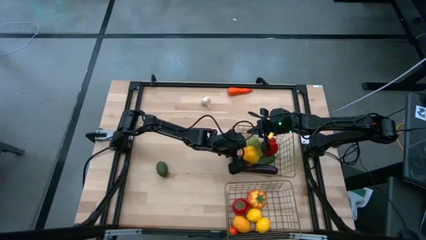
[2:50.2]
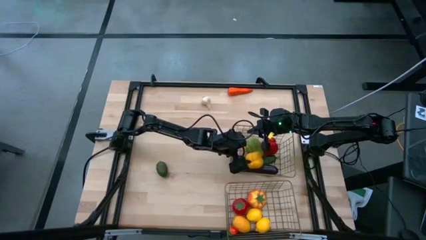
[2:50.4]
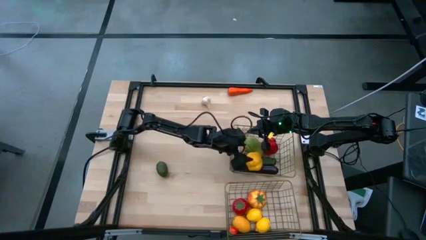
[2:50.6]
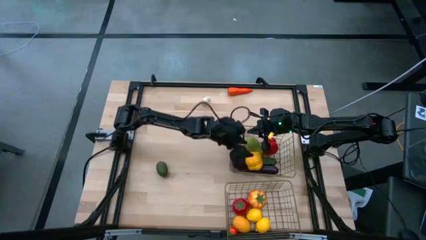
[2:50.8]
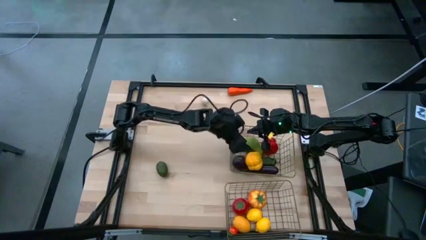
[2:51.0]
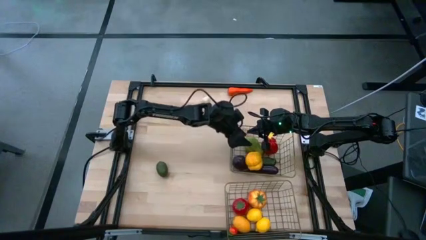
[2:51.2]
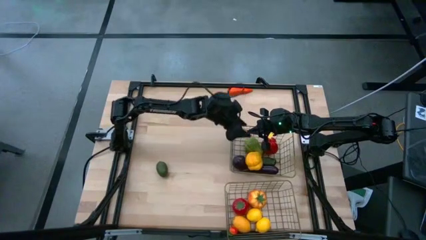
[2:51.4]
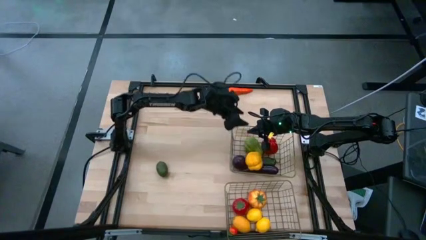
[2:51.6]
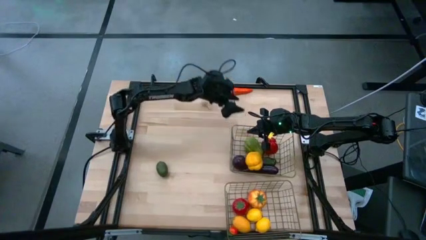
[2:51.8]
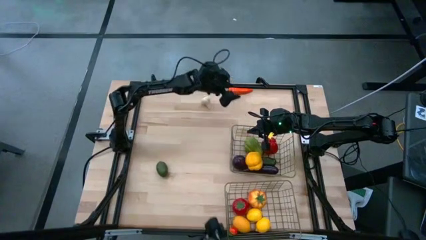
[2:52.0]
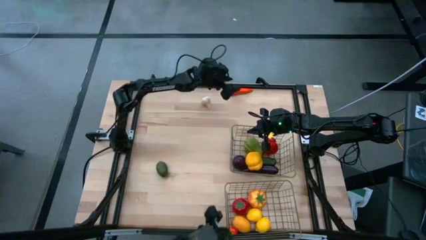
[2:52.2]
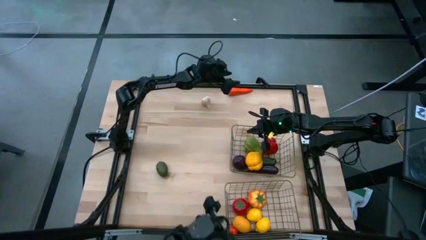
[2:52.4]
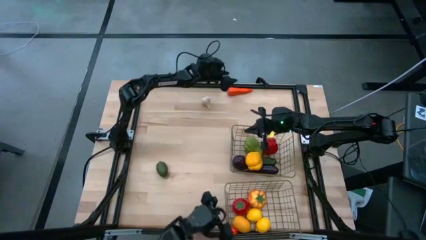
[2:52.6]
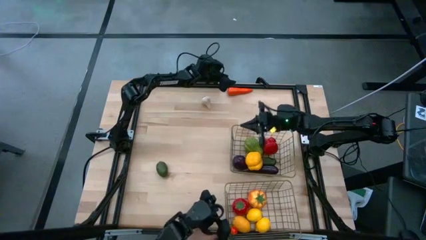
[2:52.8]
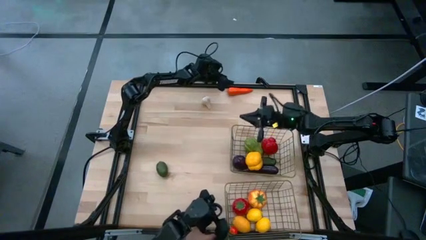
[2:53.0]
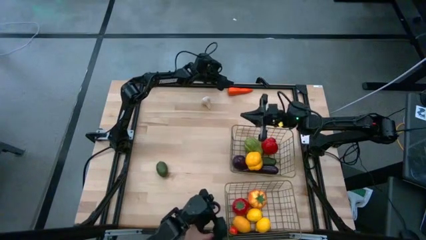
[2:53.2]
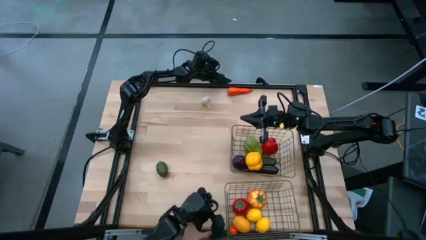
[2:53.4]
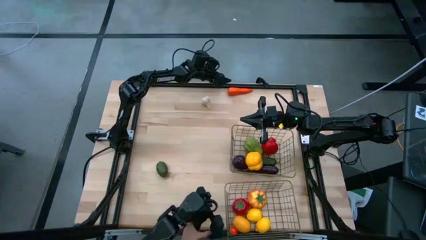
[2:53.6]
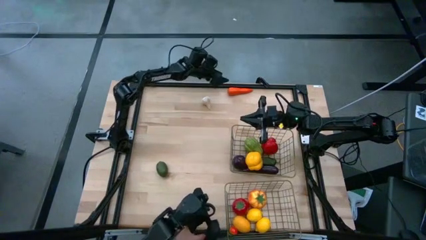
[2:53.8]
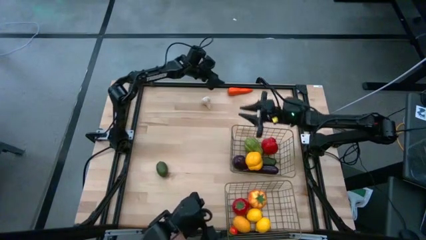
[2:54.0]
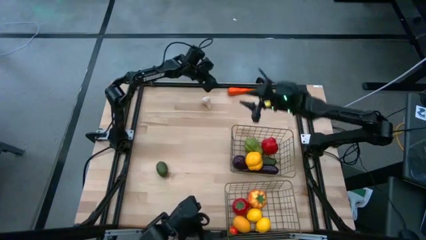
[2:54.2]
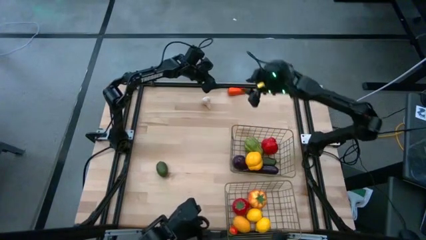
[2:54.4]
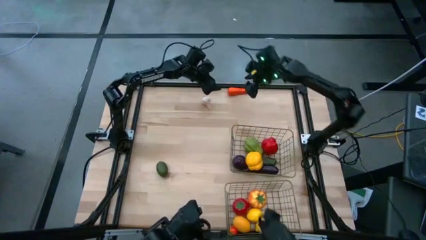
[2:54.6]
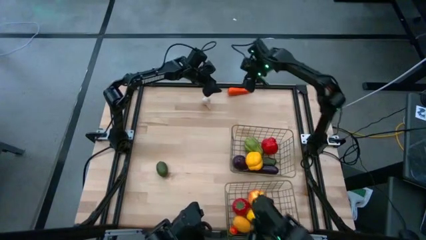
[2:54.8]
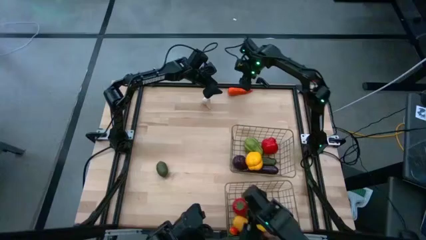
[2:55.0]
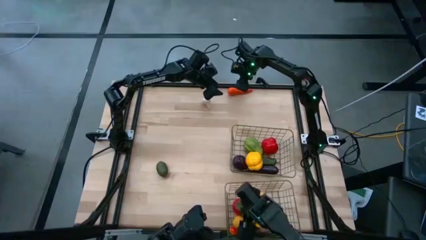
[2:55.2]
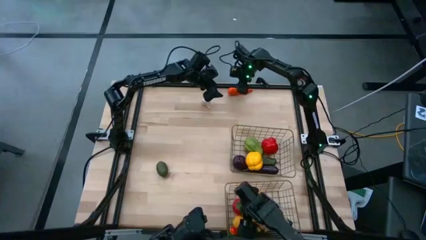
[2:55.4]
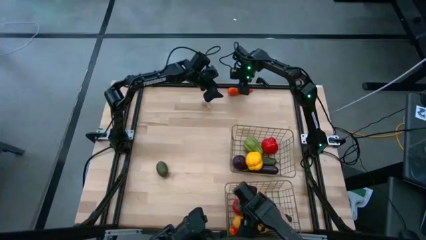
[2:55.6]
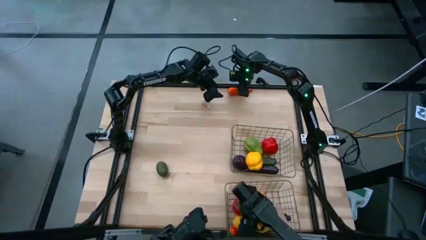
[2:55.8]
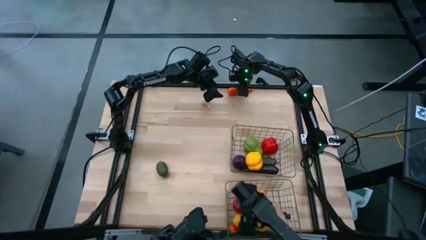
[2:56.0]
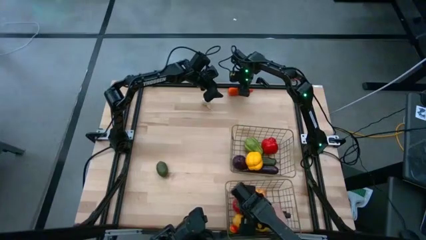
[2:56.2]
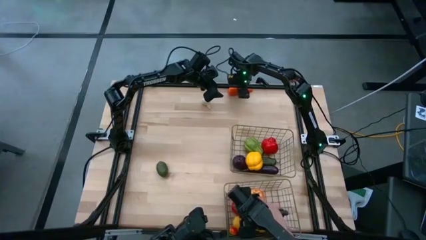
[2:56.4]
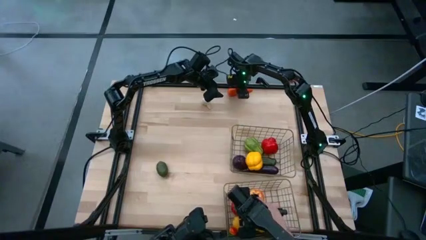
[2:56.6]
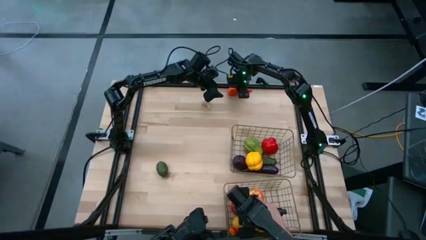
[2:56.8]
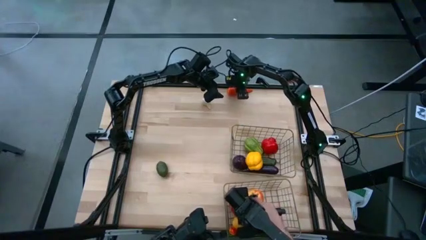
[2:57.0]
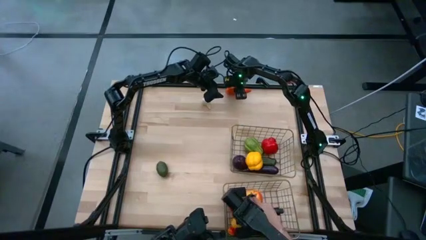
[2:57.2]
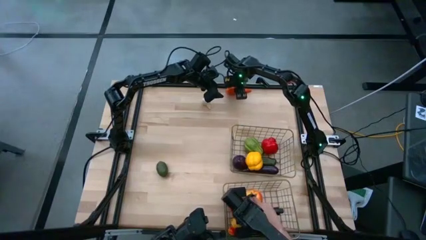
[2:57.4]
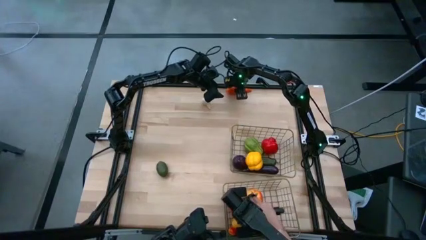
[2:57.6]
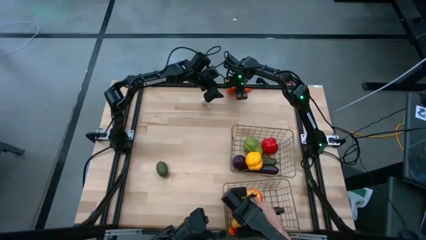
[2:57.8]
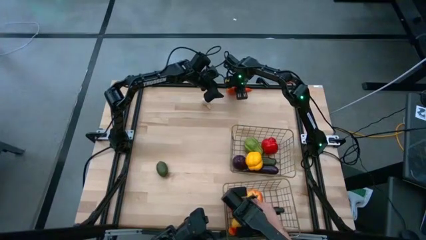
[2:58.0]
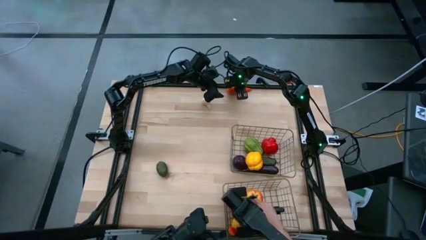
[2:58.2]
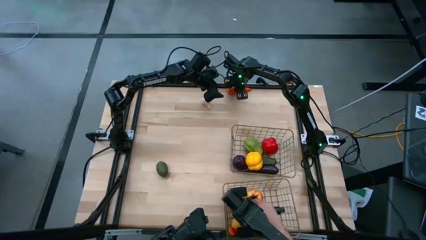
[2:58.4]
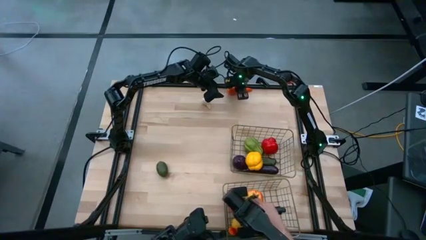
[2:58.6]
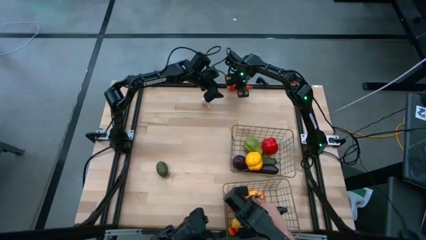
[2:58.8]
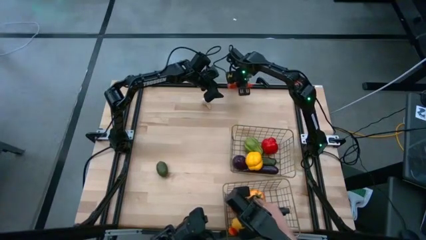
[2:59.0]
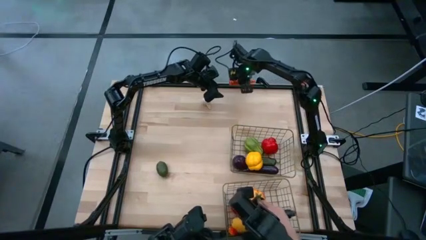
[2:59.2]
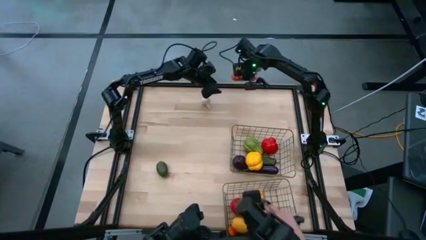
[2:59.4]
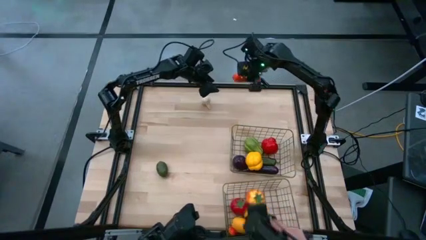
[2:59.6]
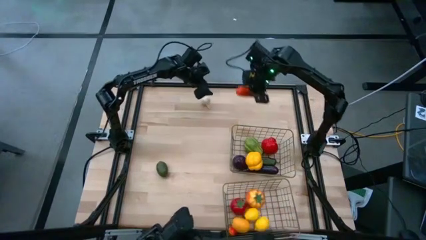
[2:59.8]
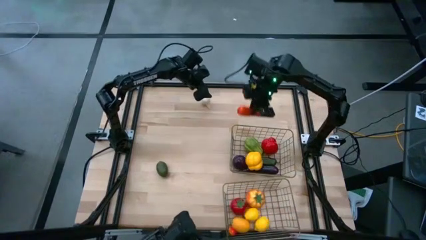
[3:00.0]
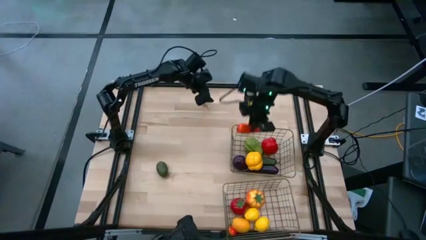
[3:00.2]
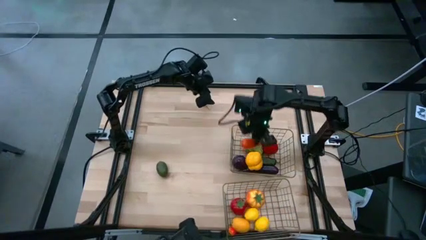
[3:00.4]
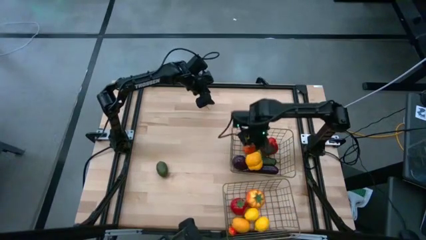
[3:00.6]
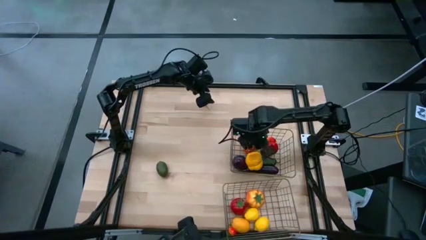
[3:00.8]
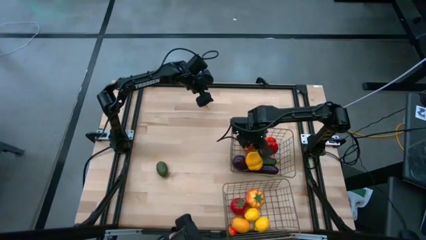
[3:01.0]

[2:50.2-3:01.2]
Task: Sort produce into baskets
Put the carrot into the top wire basket

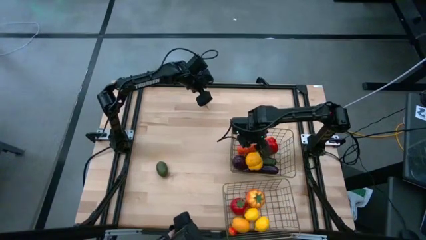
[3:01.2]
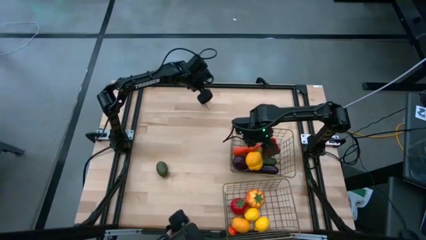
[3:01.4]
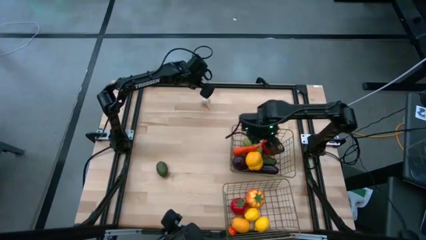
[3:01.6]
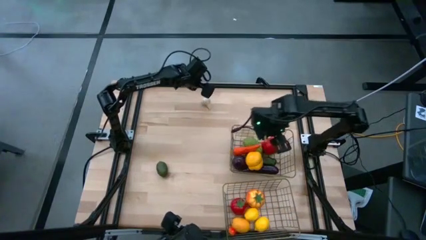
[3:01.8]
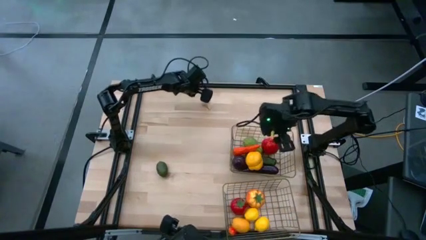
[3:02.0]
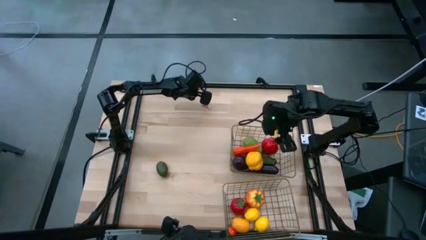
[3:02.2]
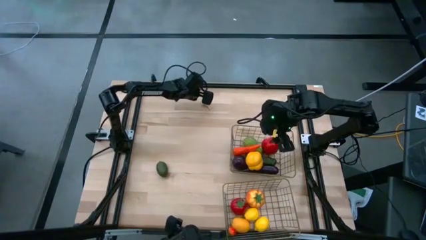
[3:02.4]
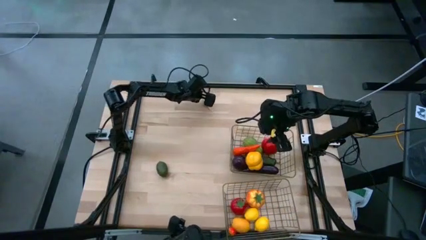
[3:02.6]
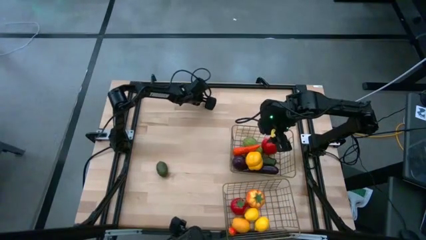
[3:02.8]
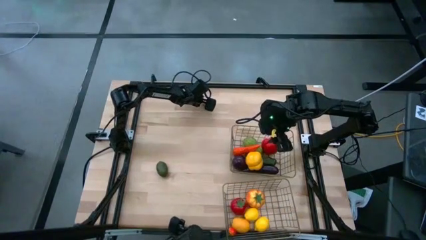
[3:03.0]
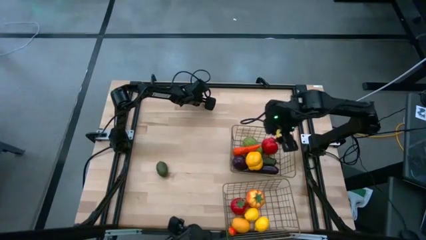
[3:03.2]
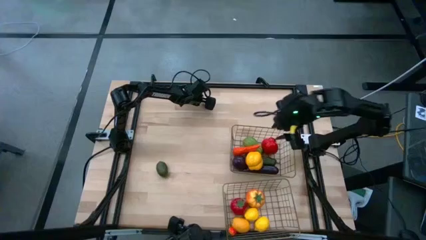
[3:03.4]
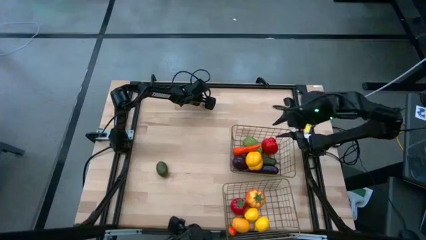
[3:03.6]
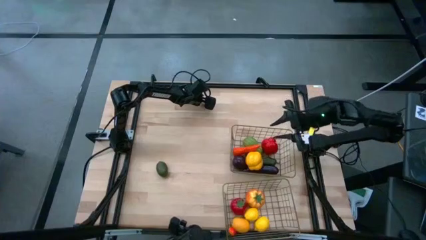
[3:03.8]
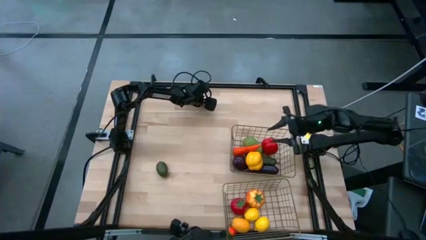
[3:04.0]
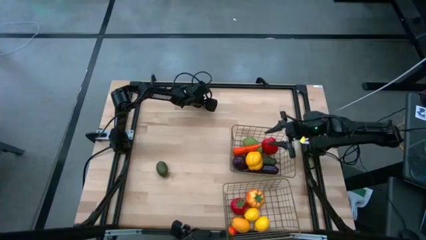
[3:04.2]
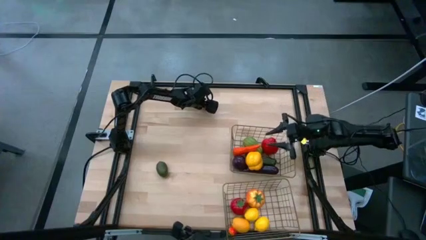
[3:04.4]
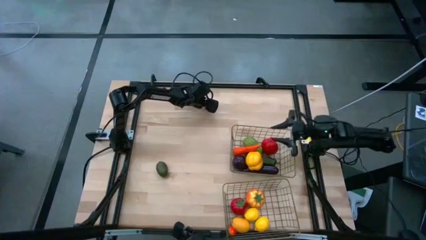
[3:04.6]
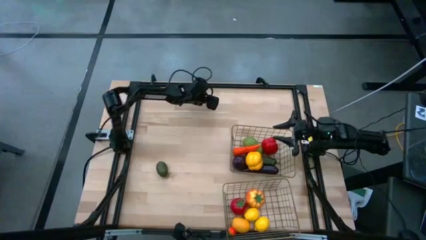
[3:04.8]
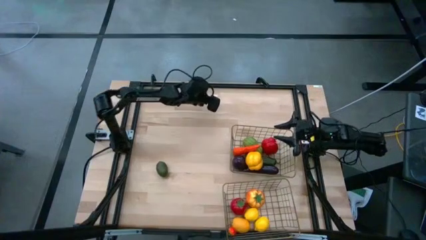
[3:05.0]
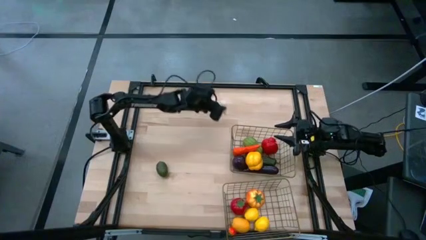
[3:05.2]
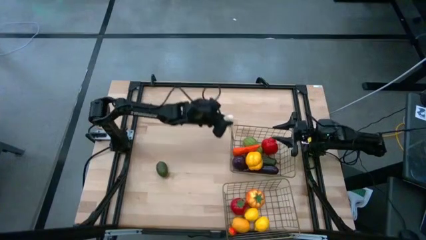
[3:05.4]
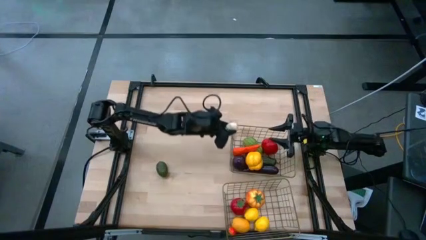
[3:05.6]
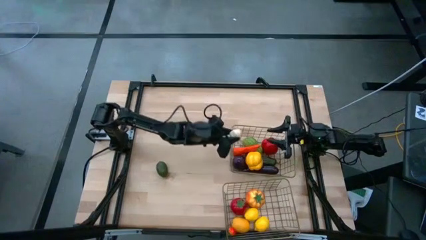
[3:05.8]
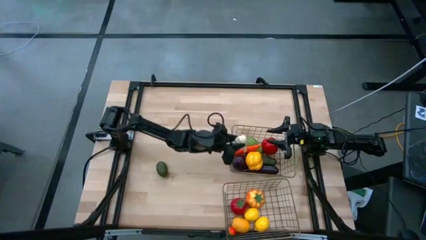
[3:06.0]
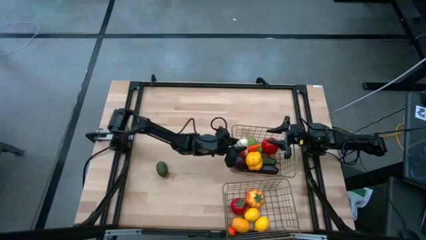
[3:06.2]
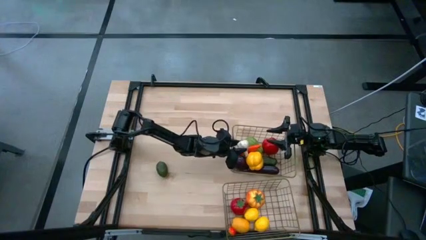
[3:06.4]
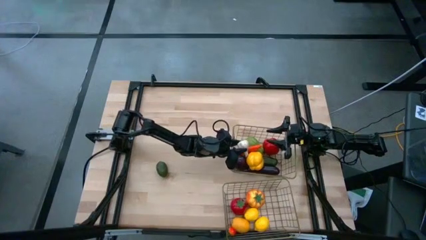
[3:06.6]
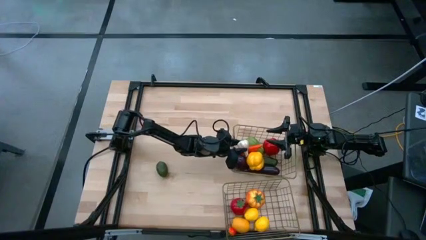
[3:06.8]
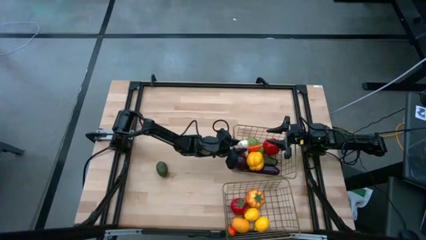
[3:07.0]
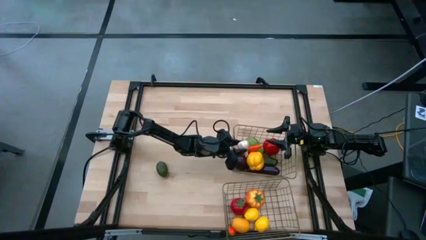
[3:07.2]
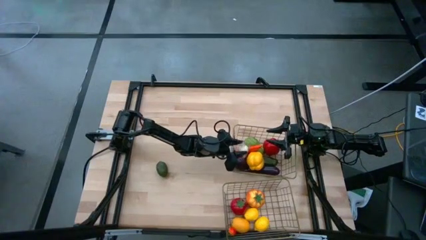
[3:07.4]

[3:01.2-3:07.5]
Put the garlic into the top wire basket
